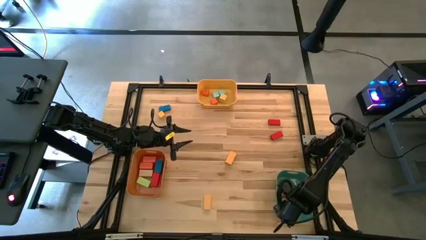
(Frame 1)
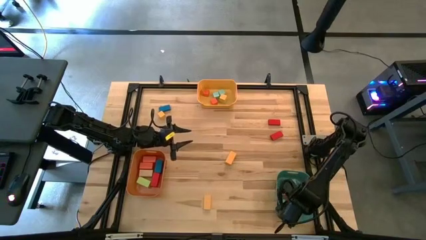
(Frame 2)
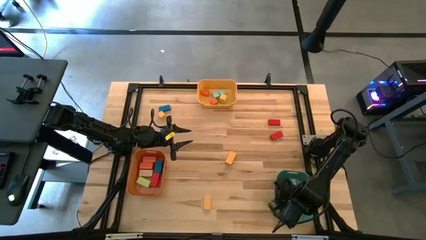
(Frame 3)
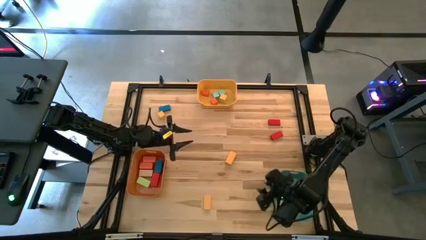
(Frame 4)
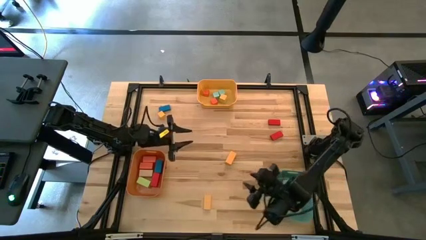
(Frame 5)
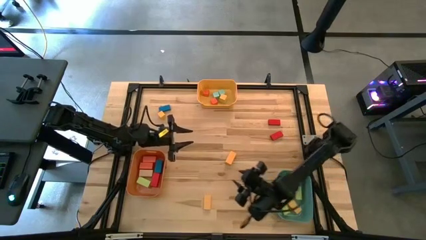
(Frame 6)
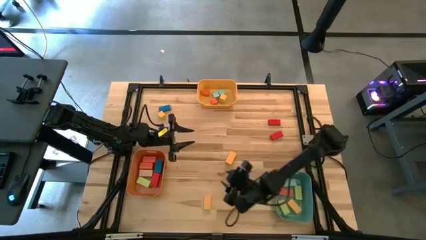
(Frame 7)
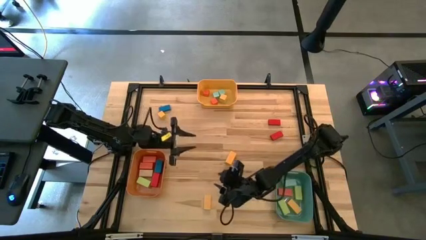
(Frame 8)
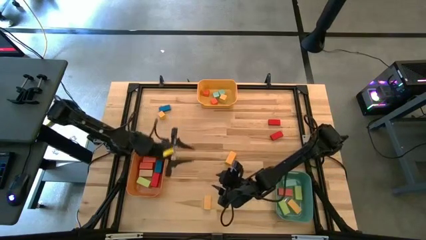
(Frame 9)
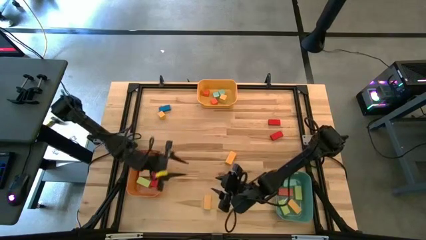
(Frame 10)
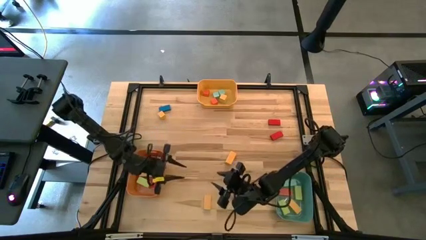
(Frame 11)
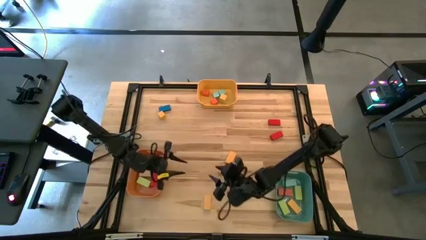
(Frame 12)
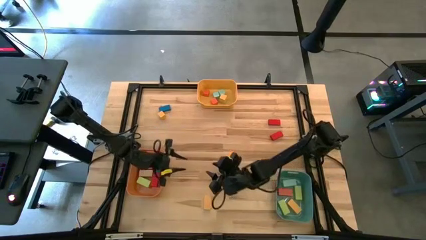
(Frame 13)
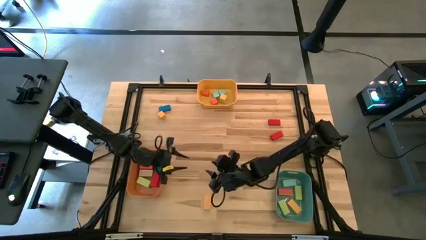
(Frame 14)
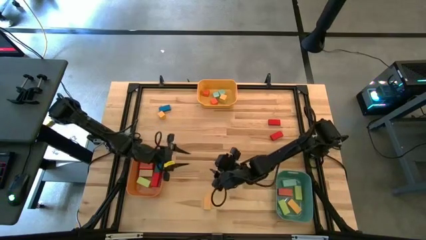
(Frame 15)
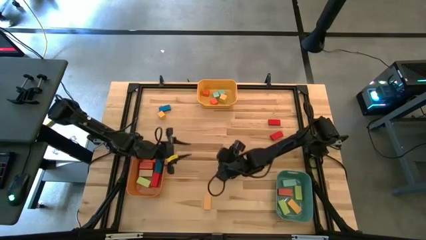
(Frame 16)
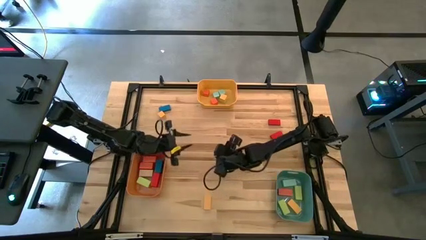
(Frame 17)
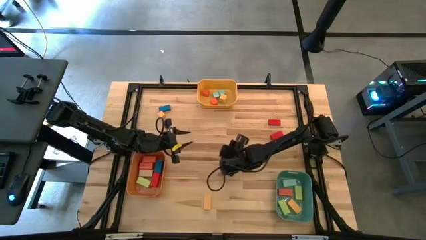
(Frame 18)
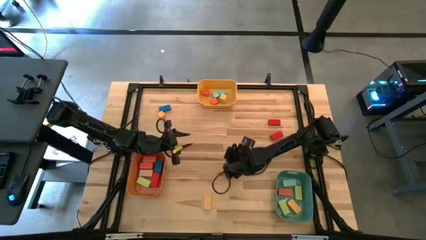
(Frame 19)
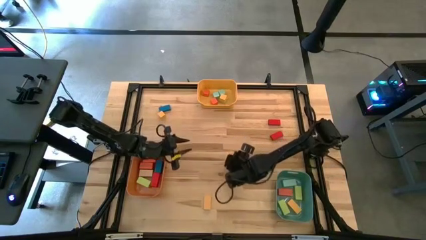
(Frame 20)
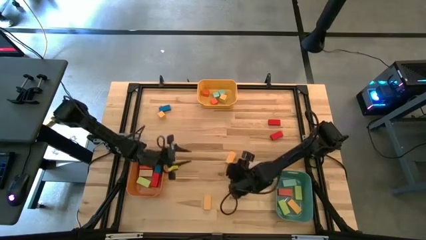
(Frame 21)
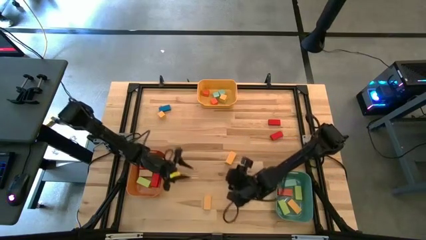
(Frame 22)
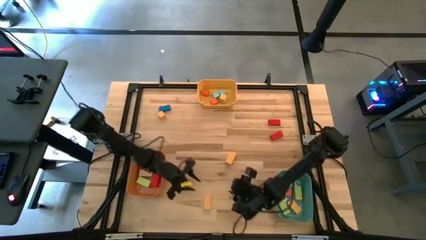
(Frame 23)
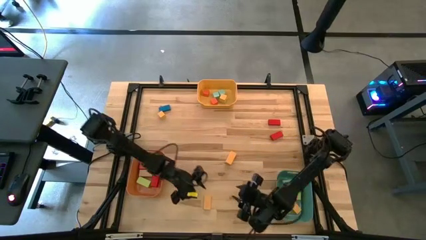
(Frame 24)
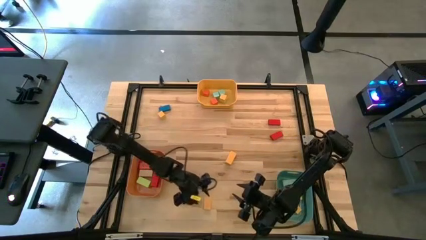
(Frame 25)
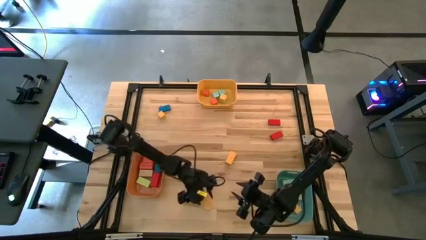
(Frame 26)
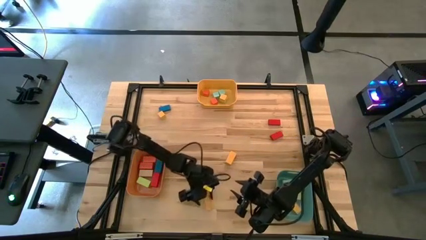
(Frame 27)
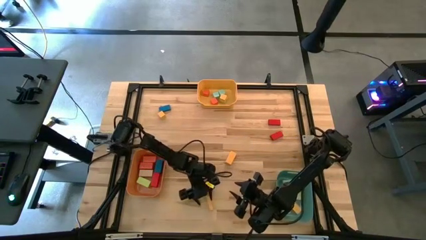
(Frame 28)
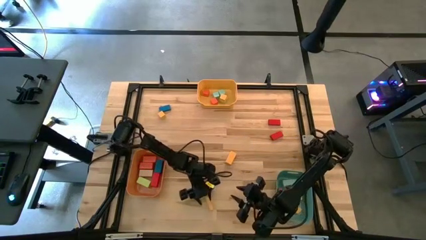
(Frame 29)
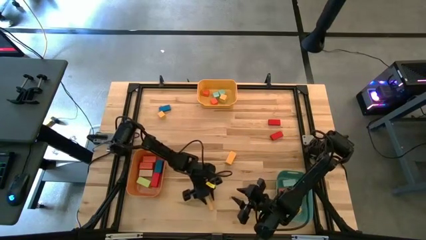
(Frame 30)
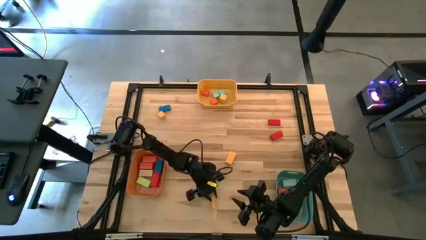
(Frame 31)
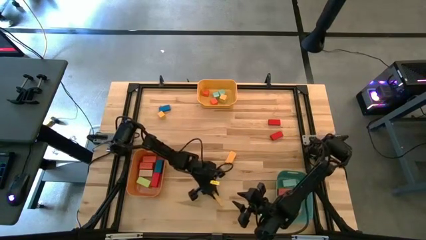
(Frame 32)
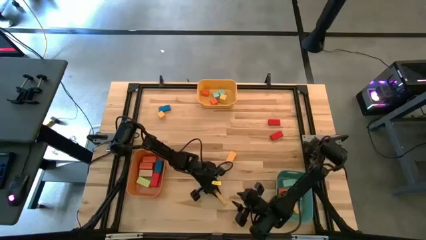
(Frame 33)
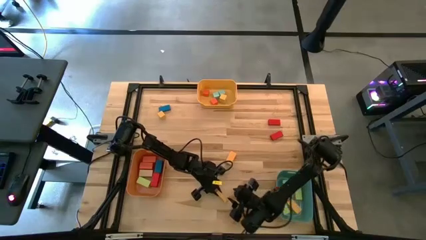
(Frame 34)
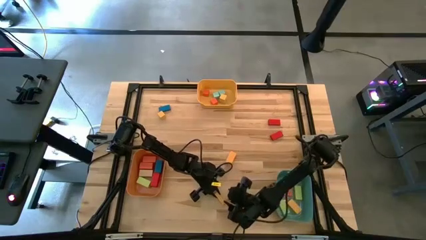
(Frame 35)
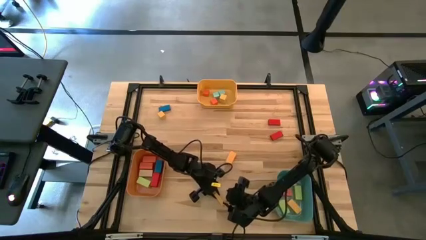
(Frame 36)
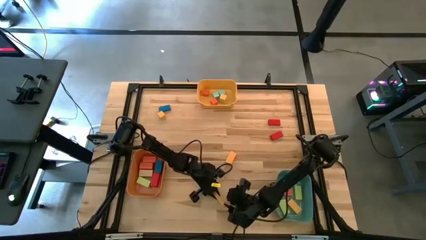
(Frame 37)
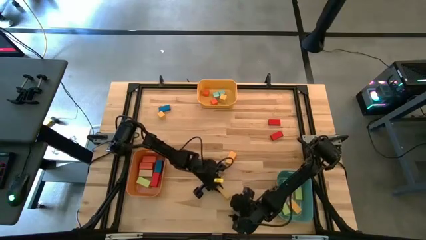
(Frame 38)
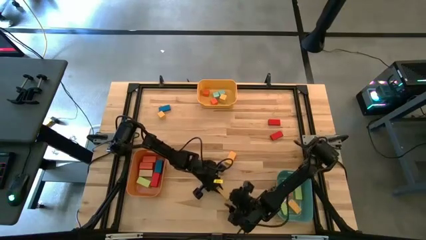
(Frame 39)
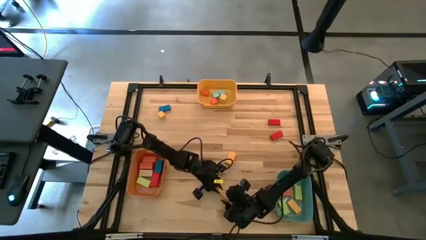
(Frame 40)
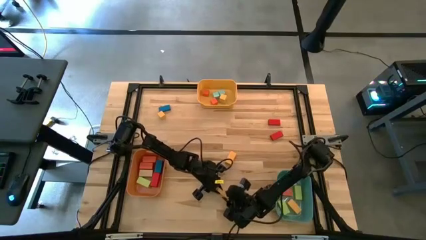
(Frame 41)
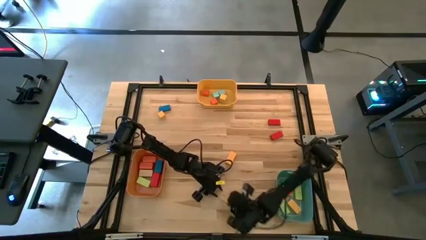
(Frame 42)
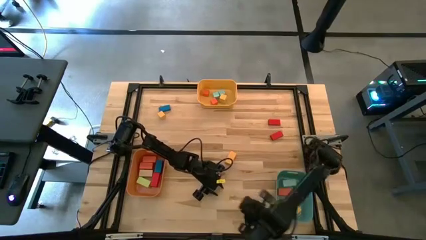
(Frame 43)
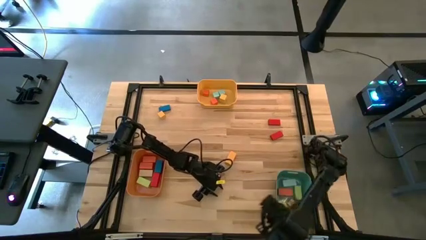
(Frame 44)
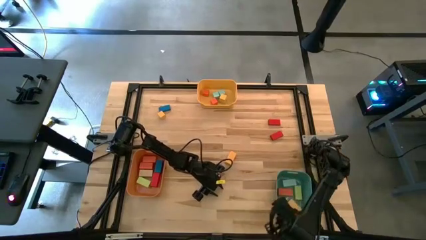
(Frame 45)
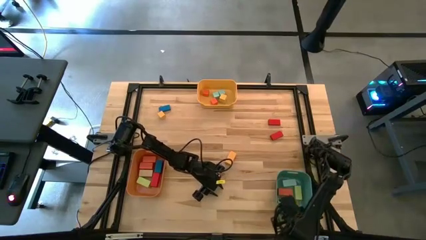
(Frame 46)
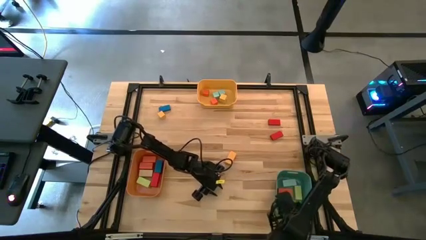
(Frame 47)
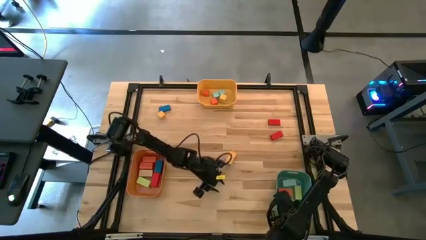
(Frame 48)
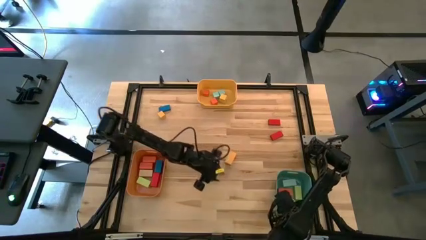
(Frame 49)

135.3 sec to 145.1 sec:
Task: Sort blocks by size
Put the thin yellow block into the green bin

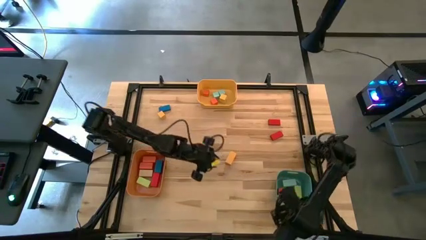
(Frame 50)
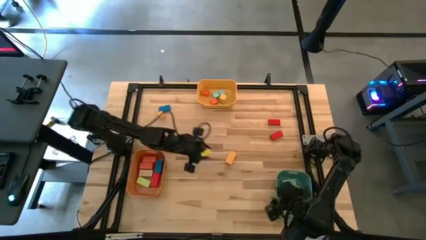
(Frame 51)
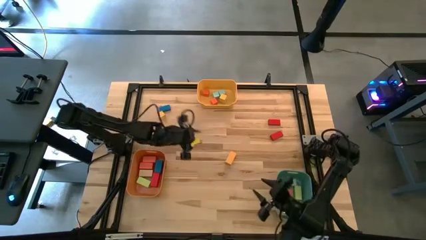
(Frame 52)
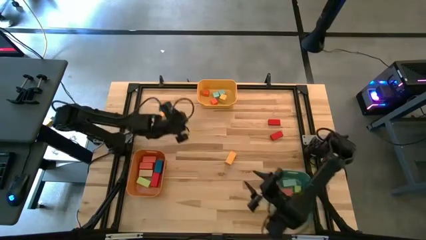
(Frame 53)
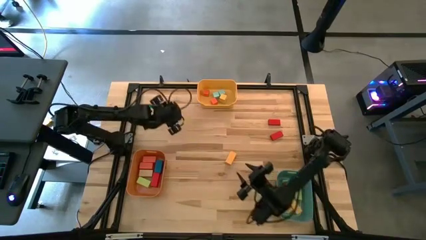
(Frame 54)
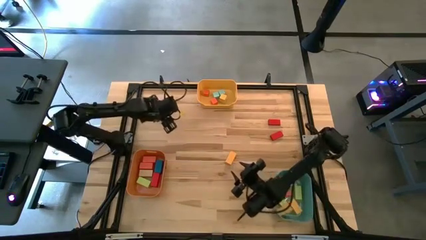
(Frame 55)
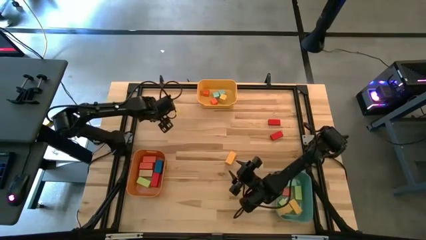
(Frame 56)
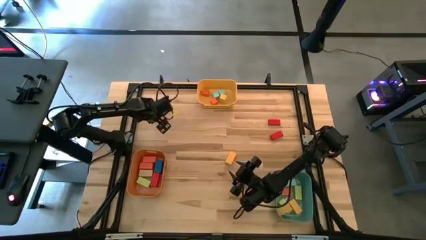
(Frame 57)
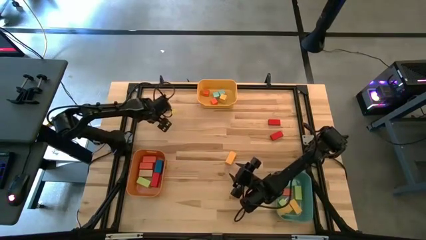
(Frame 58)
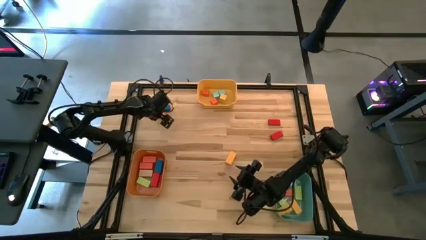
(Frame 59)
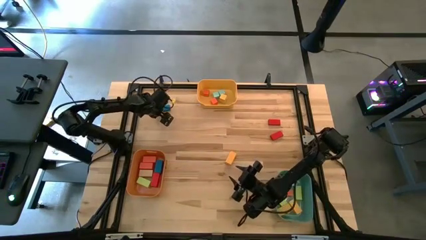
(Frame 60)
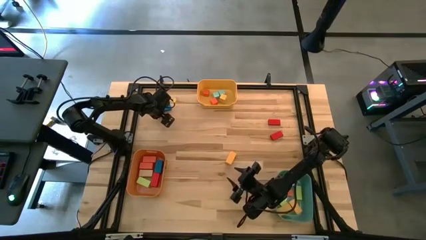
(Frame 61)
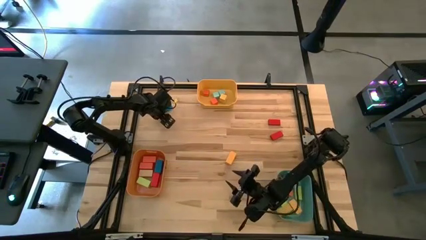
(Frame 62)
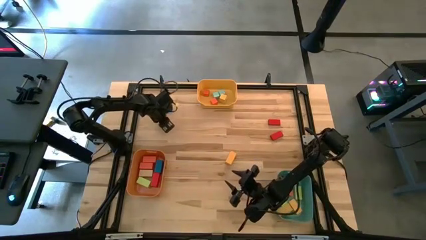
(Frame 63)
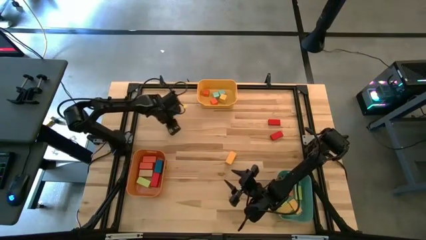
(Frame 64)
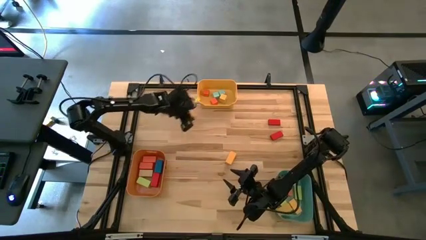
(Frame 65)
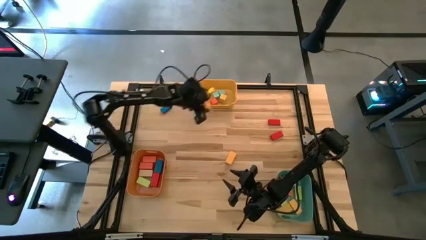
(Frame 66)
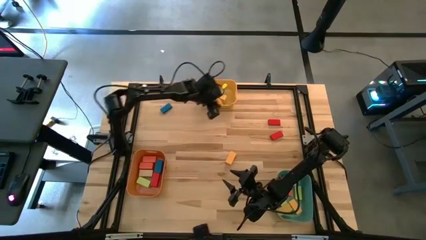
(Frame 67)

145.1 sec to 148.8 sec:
Put the small yellow block into the yellow bin

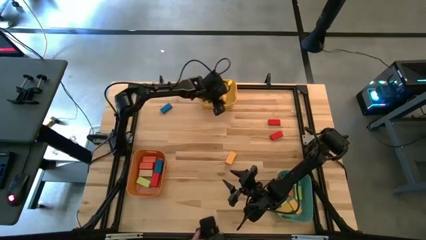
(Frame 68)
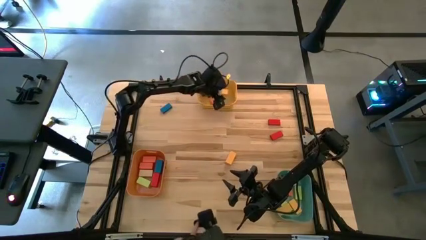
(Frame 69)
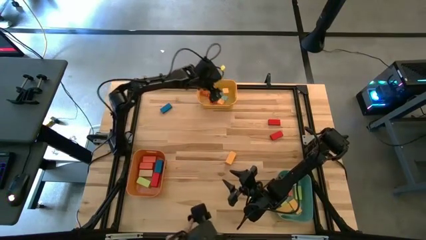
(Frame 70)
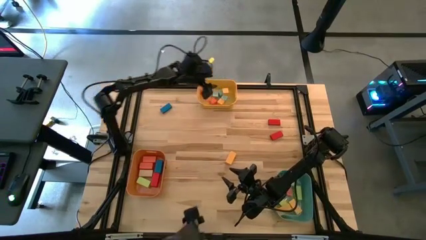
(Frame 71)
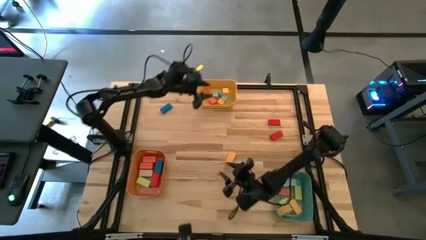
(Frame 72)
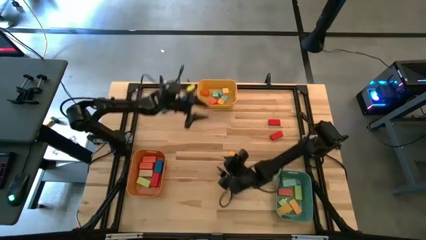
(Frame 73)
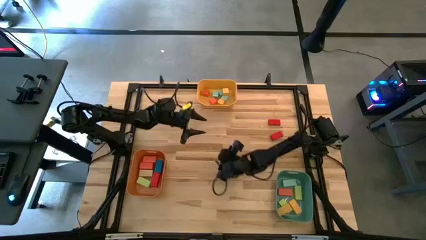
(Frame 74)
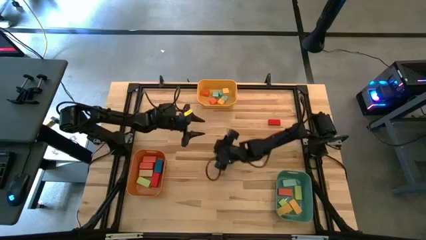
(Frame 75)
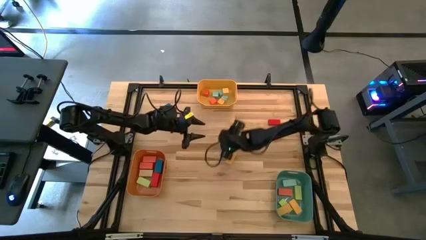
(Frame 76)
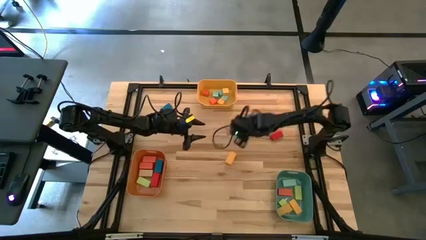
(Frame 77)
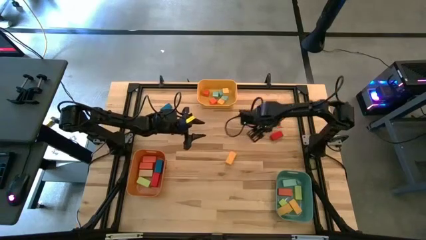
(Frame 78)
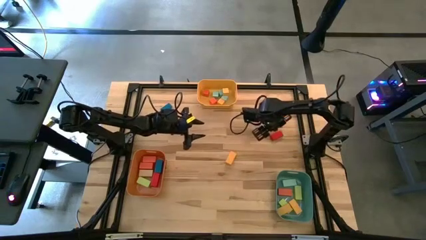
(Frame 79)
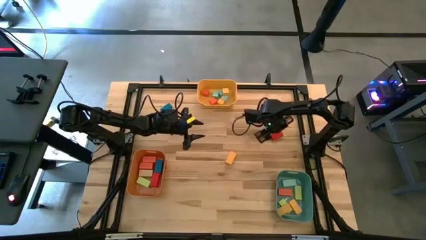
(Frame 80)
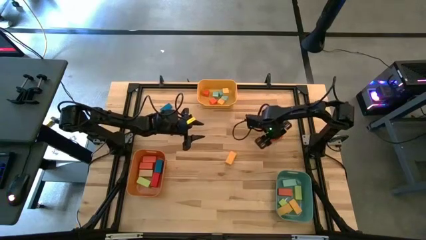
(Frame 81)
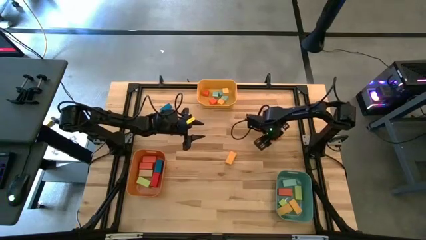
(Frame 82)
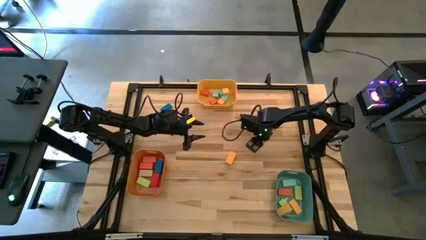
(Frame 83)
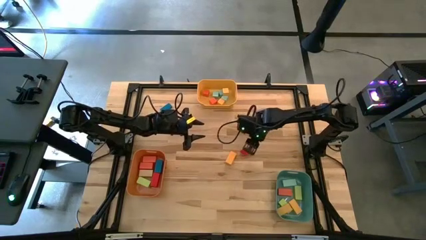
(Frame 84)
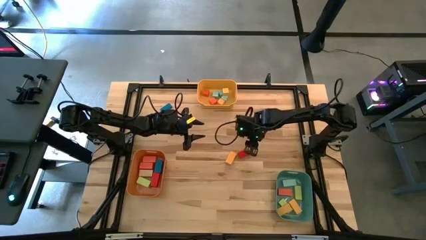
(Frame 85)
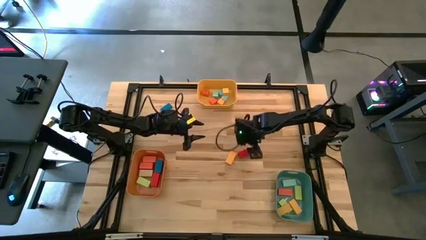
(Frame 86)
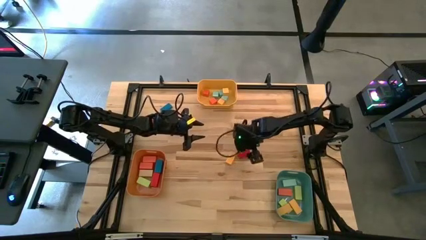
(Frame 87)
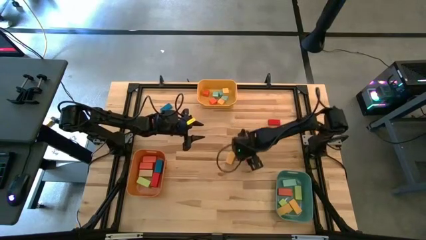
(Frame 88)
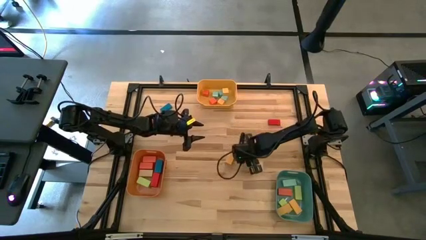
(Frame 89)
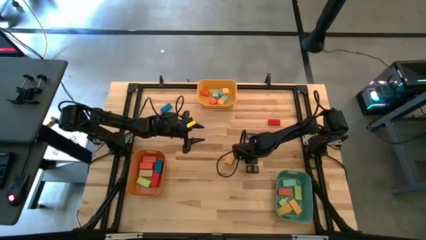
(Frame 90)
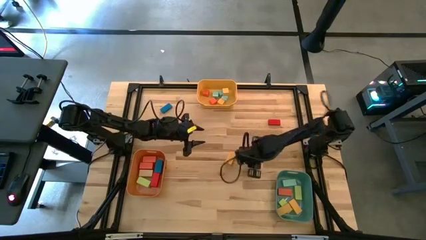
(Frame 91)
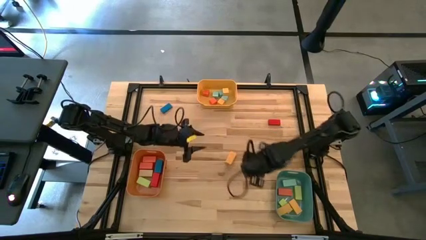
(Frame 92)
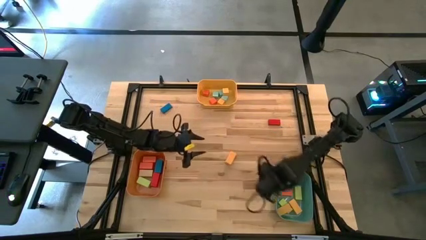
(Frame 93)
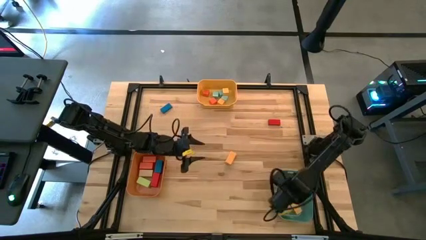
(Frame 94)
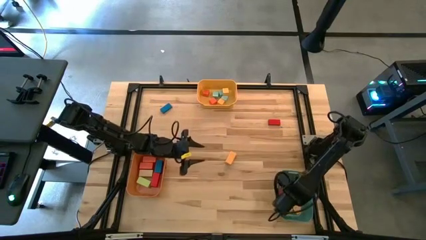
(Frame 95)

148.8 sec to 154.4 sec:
Put the thin red block into the green bin
